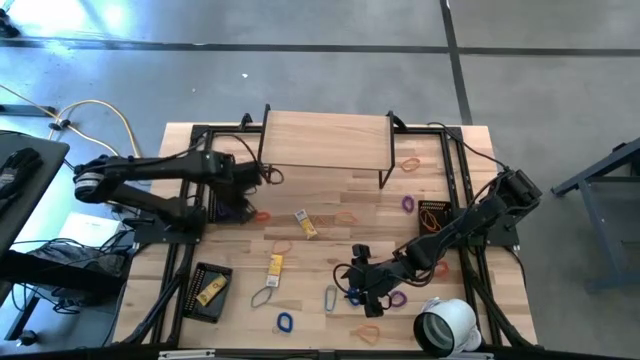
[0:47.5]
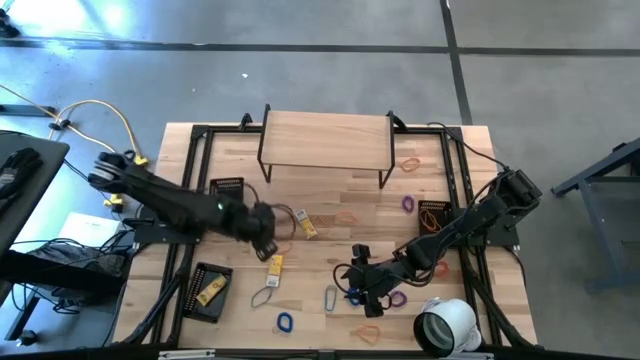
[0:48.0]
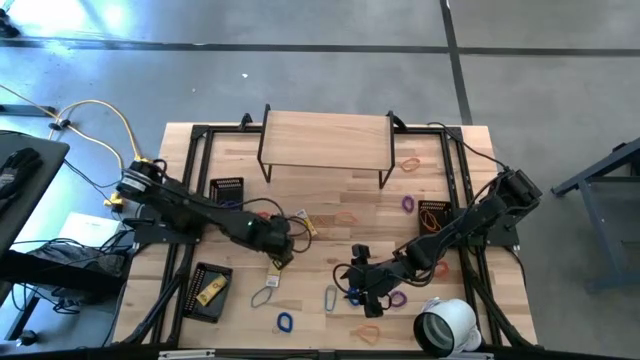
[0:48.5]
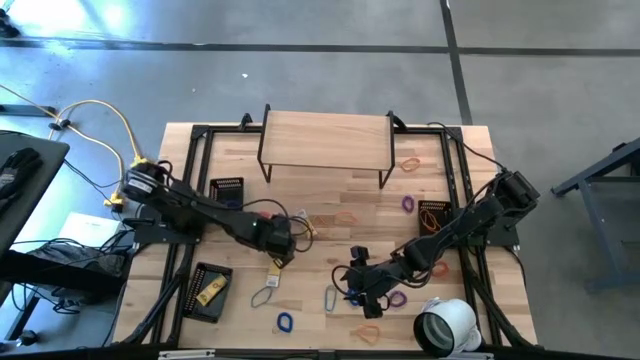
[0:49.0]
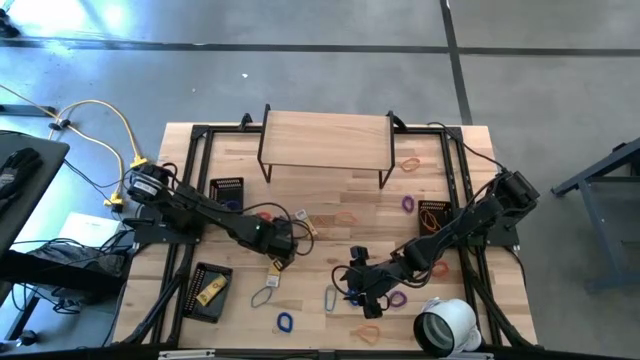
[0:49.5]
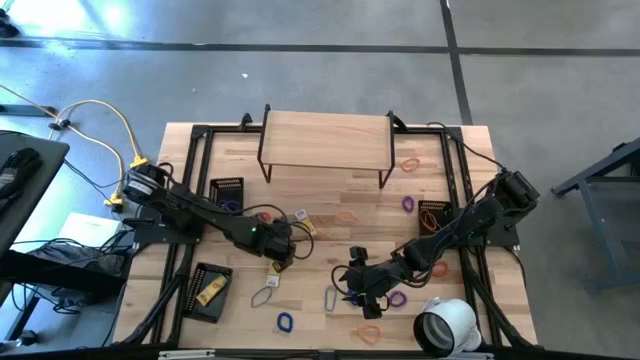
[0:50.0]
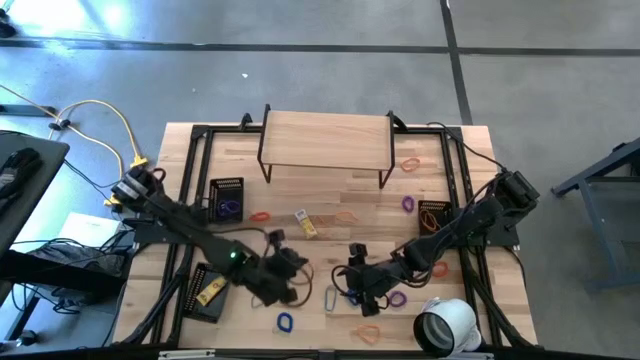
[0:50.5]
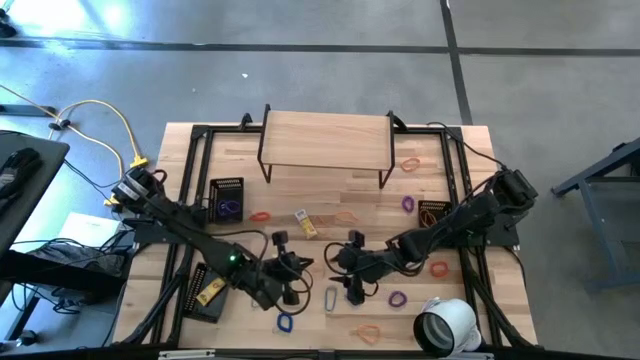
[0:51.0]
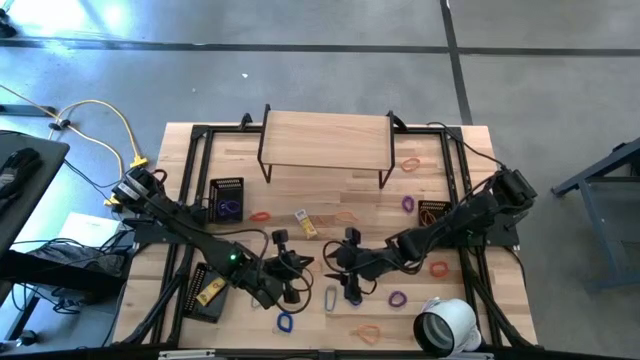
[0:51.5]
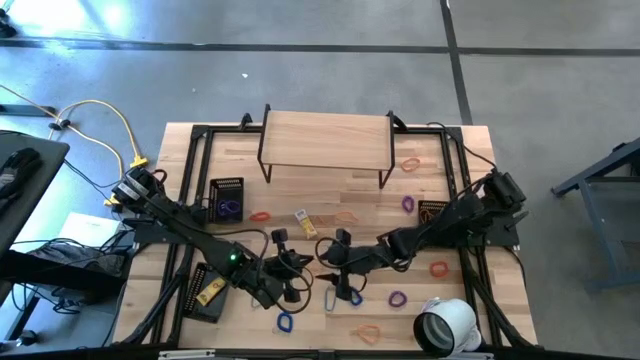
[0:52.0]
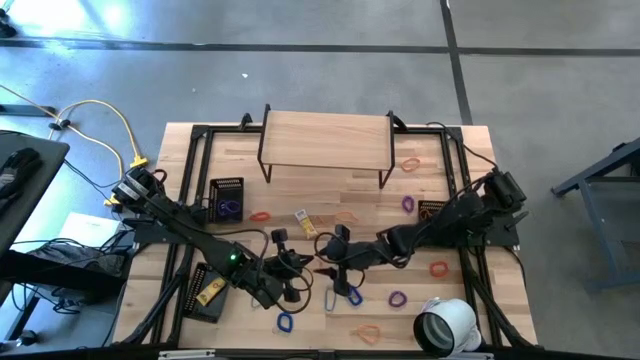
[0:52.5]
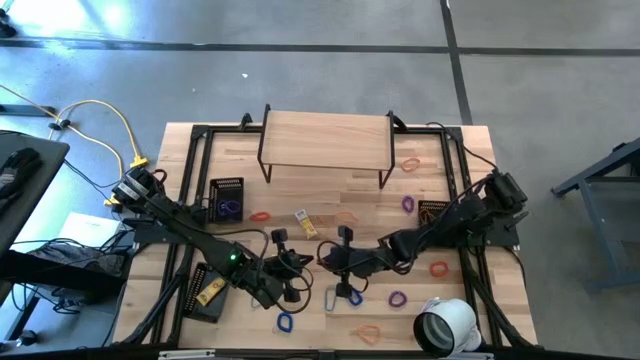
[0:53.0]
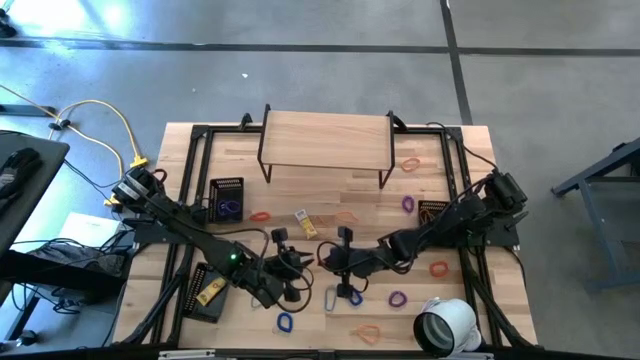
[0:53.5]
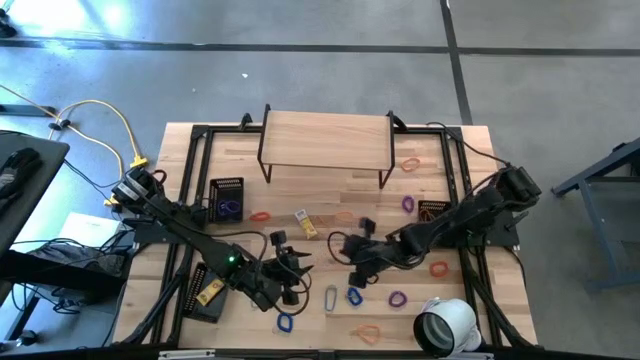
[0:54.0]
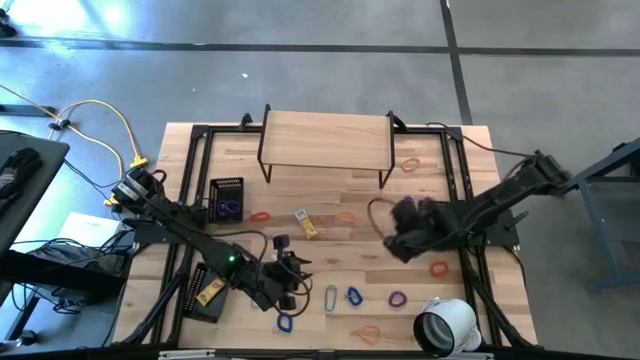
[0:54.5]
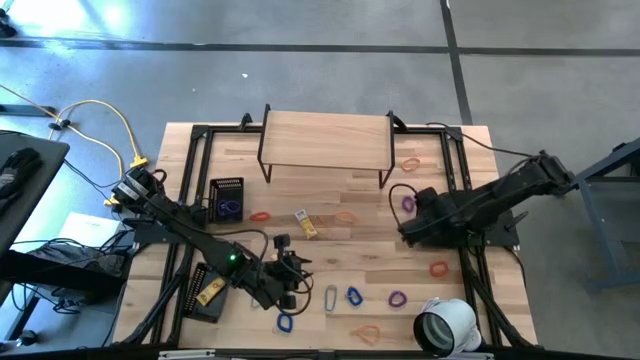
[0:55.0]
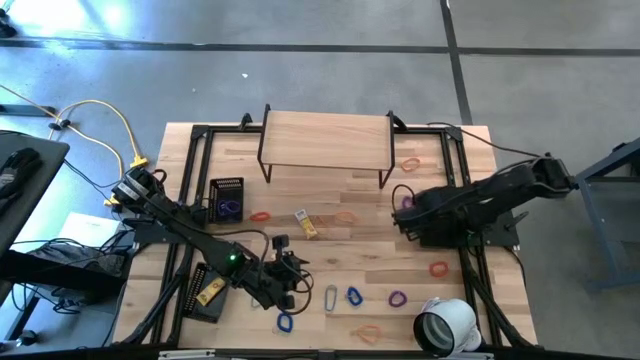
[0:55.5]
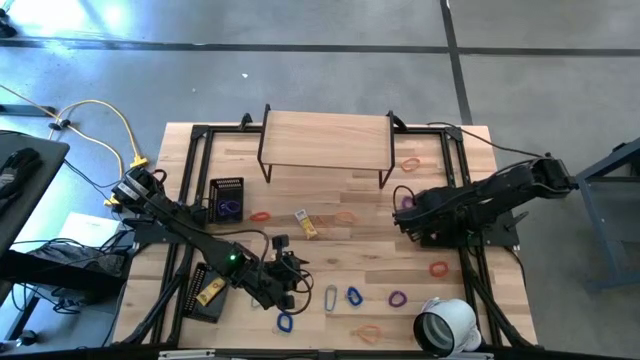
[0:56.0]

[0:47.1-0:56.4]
Task: Pick & Place Office Desk Supplies
Put the orange rubber band into the top right black bin

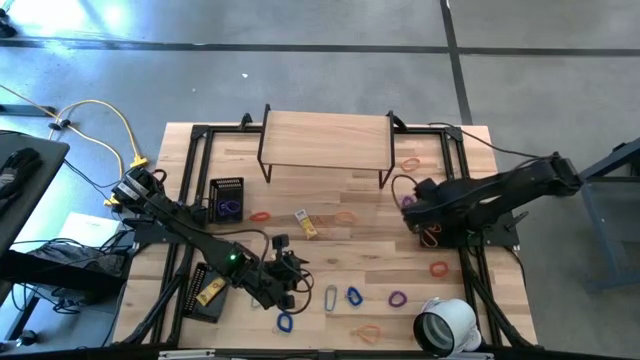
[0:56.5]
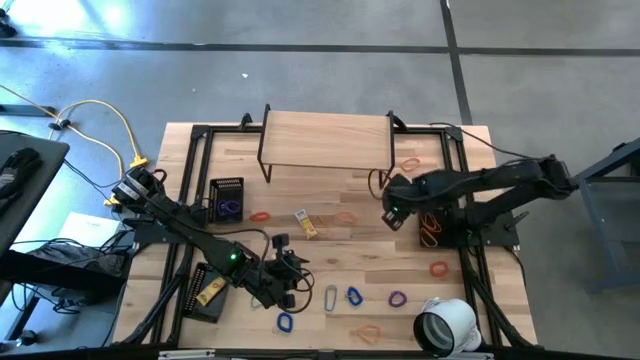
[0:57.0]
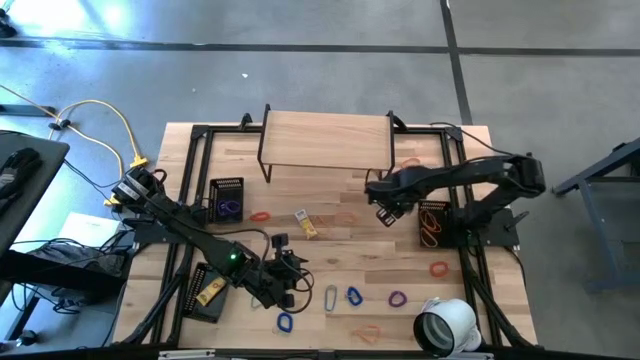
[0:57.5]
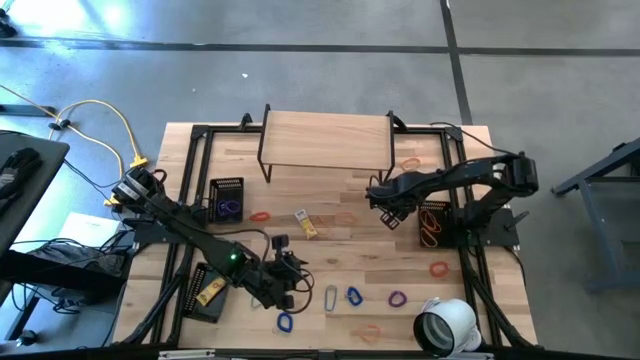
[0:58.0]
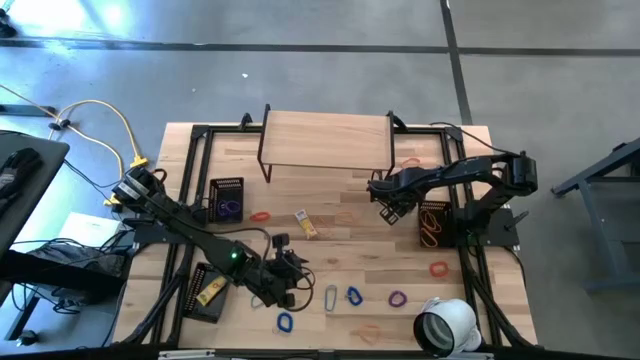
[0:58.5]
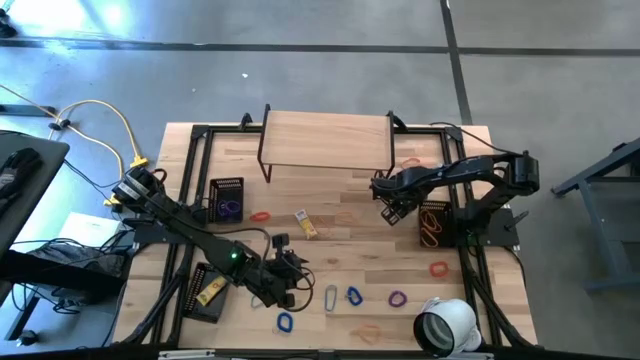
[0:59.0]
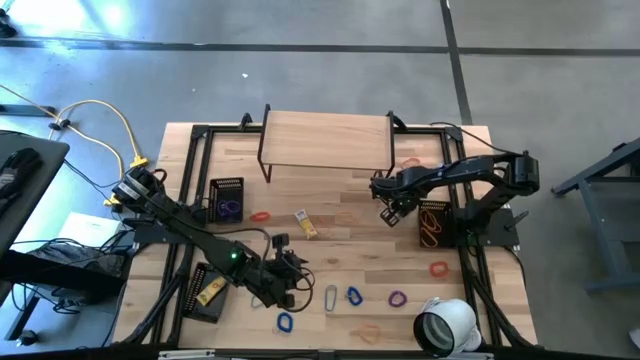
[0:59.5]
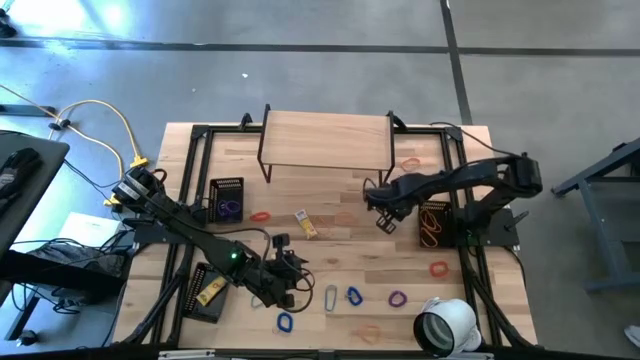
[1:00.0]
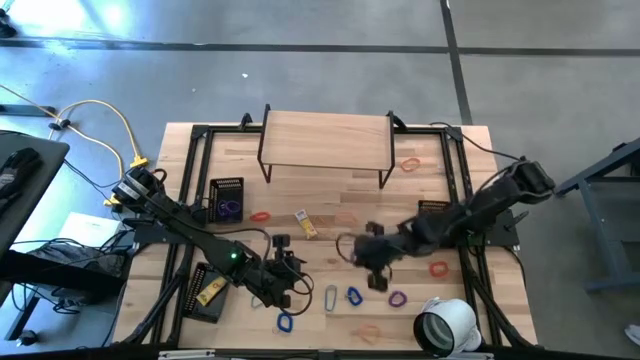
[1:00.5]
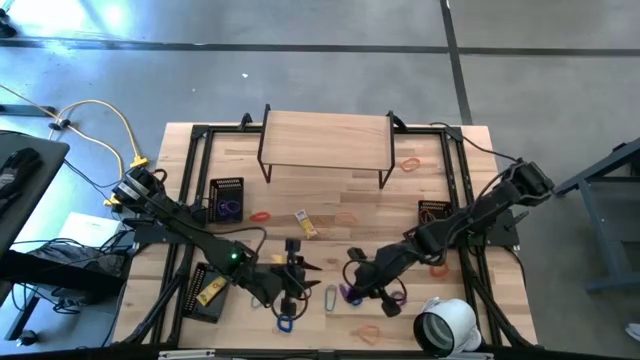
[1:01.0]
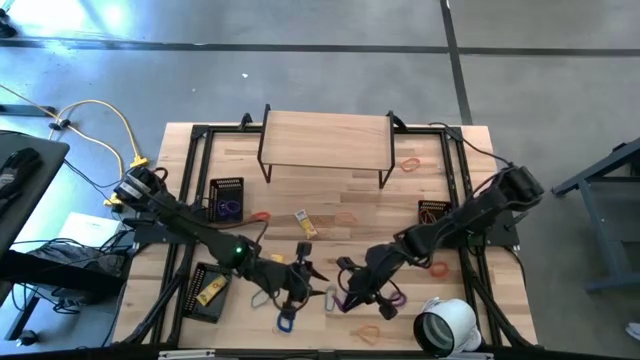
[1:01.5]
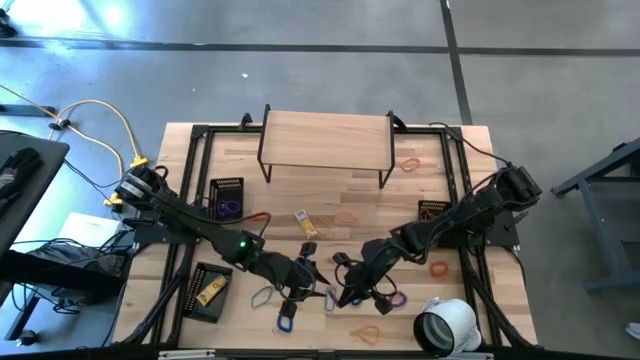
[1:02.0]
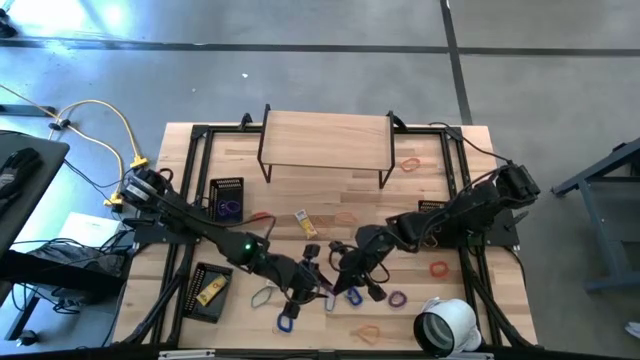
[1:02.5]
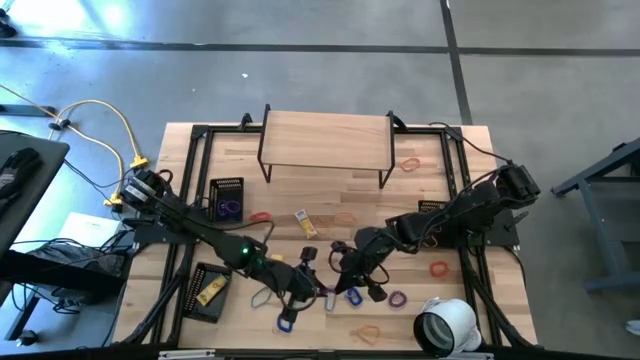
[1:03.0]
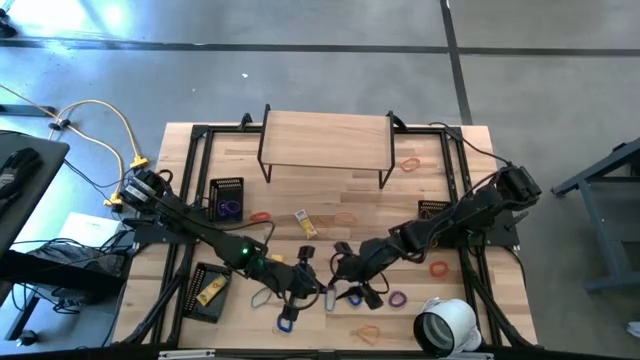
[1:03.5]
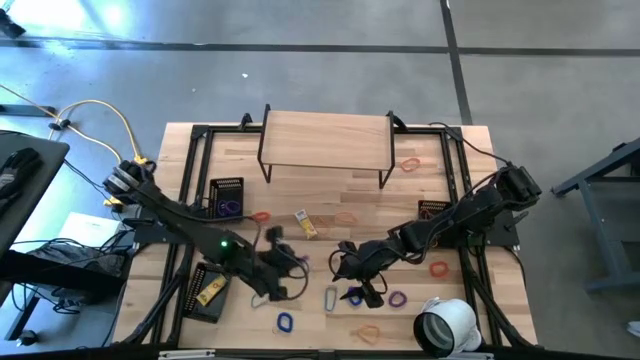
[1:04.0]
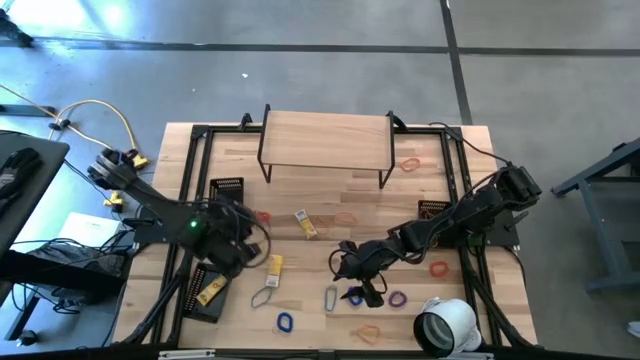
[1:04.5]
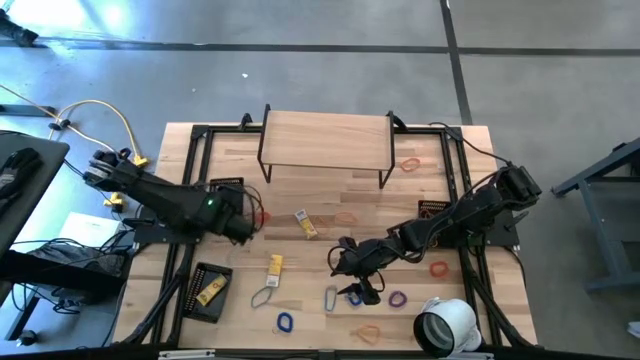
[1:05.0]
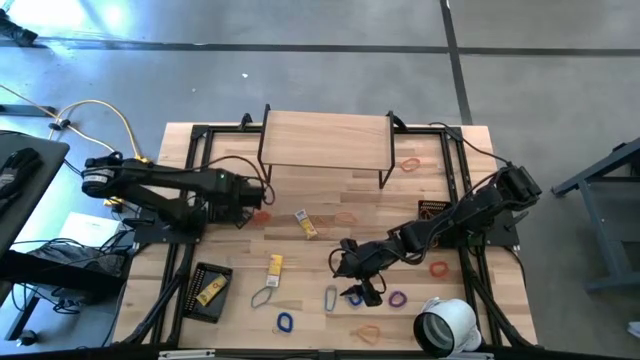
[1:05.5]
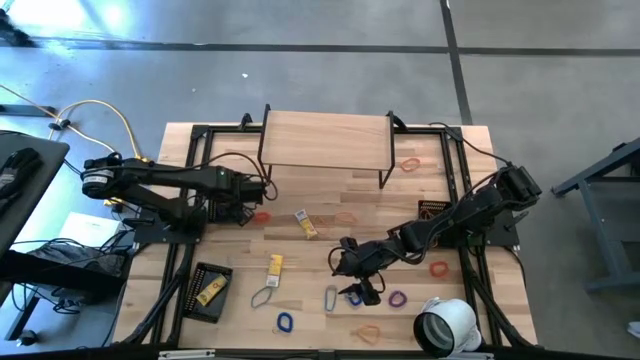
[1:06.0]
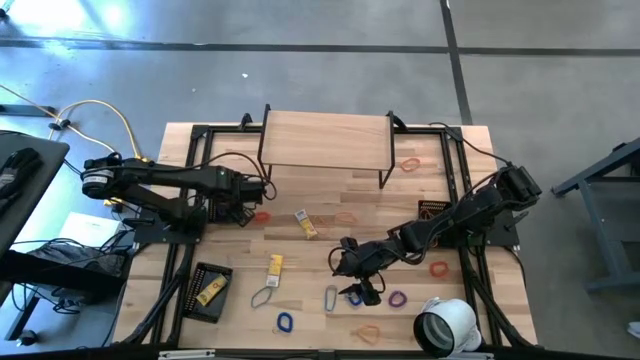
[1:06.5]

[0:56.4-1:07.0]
Put the violet spring keychain into the top left black bin

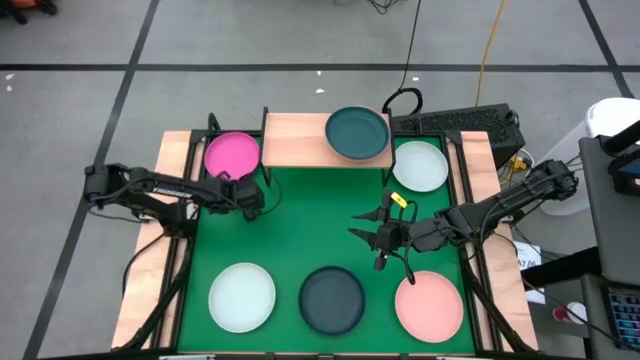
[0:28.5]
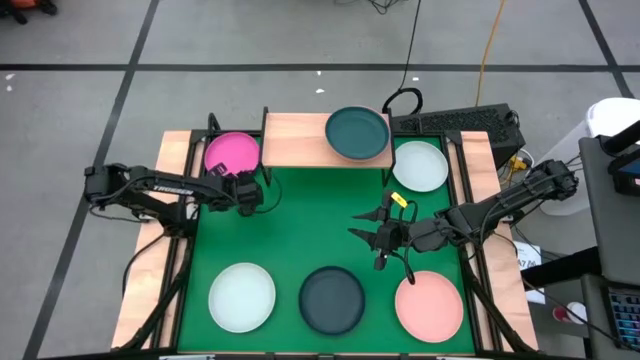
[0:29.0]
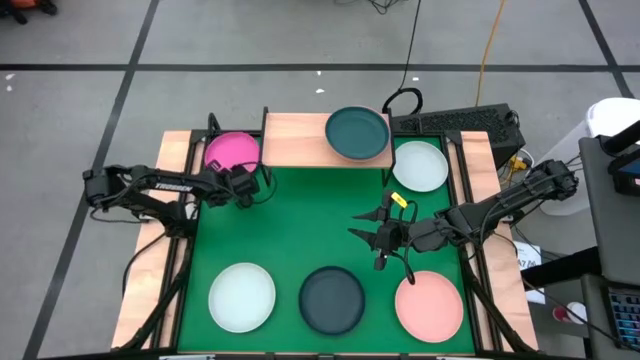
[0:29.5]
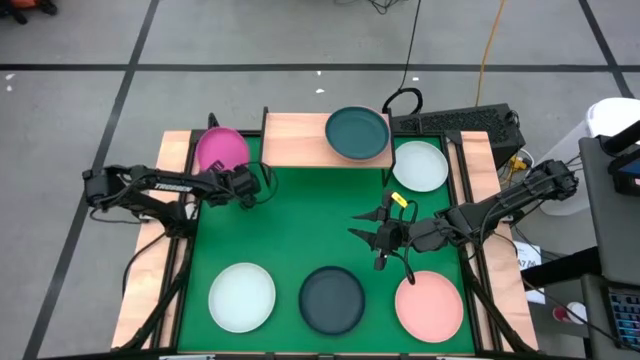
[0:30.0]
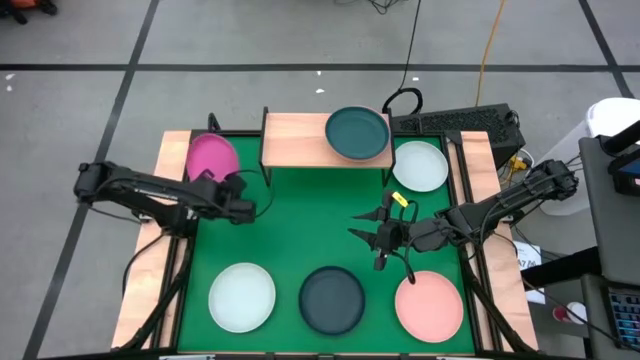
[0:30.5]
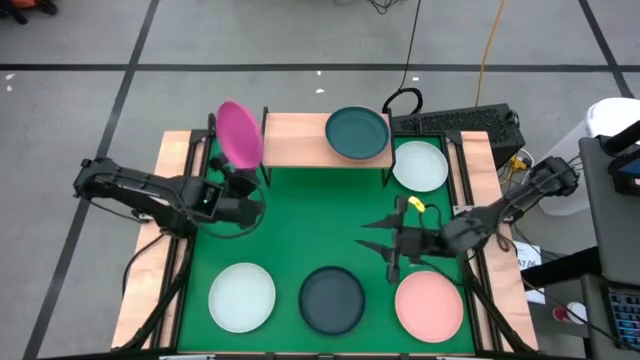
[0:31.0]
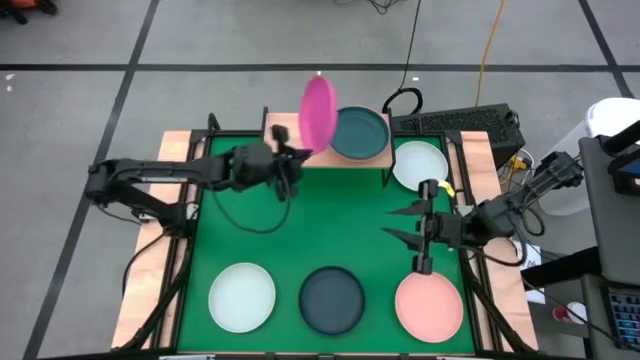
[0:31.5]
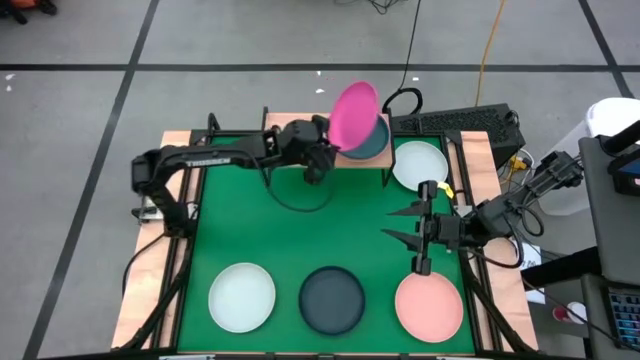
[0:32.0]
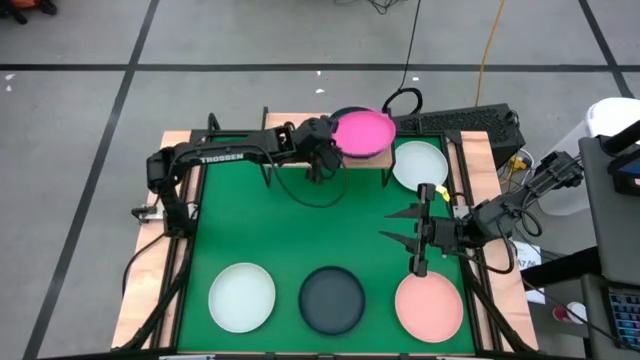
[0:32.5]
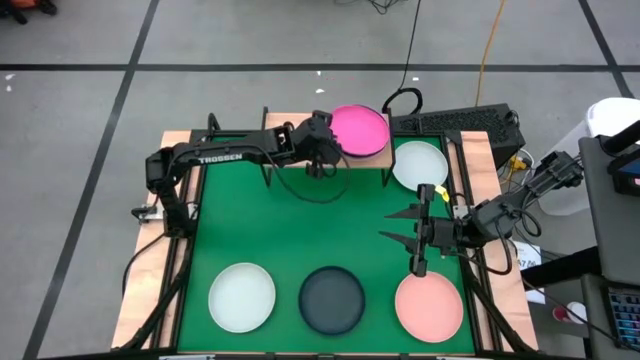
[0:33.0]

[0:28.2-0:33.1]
Task: Place and stack plates onto a shelf
Stack the pink plate on the dark green plate on the shelf
